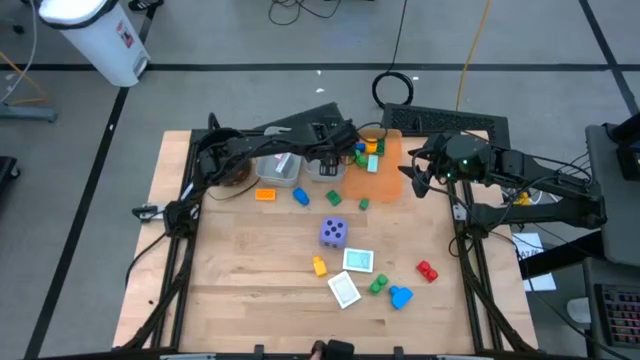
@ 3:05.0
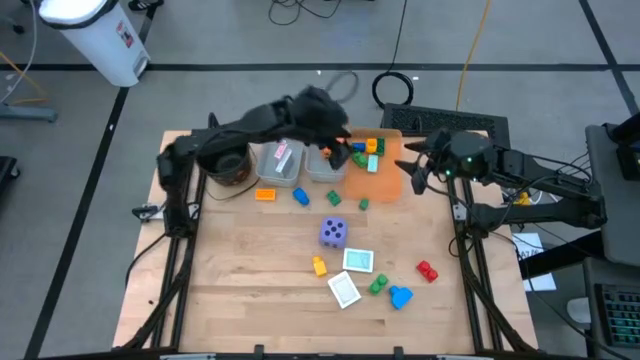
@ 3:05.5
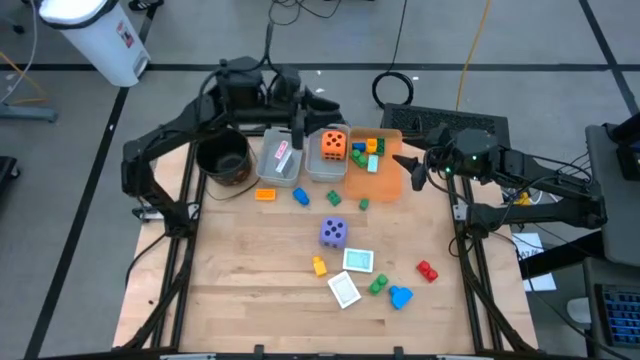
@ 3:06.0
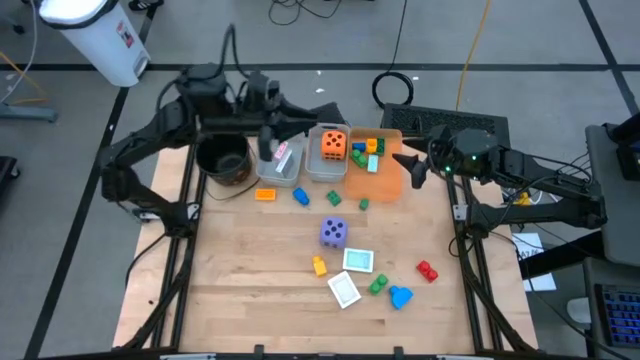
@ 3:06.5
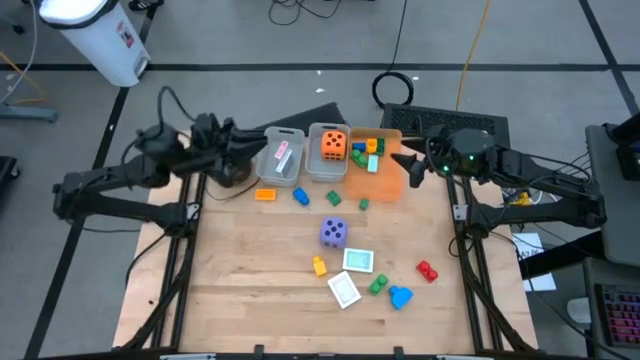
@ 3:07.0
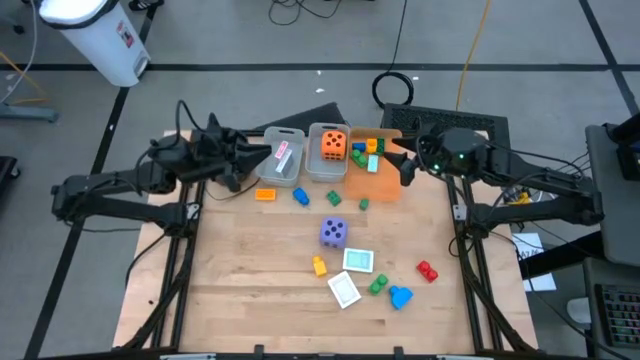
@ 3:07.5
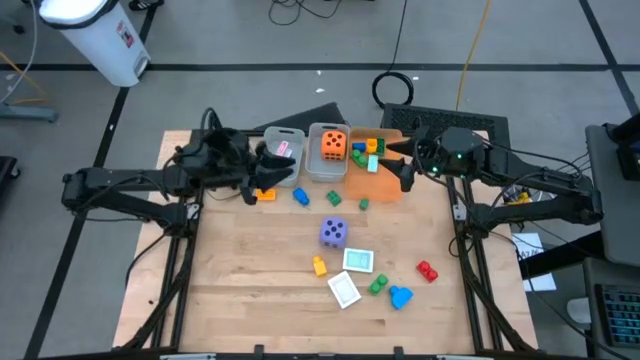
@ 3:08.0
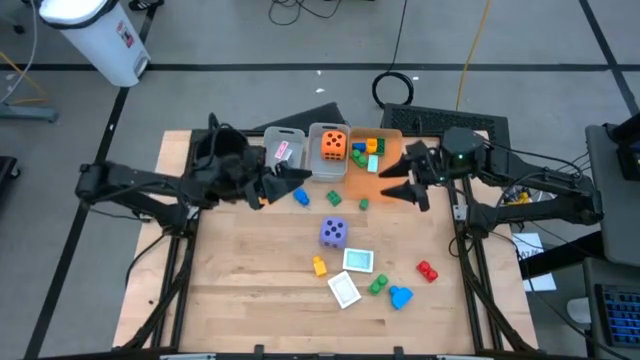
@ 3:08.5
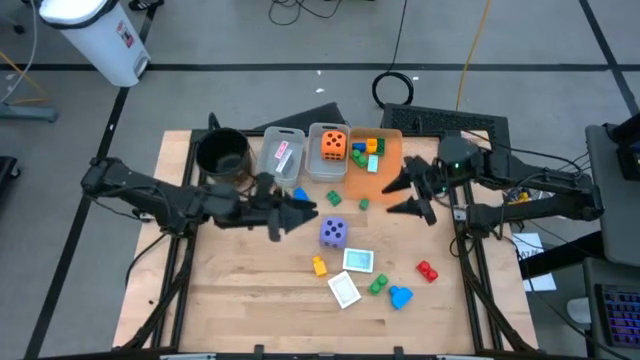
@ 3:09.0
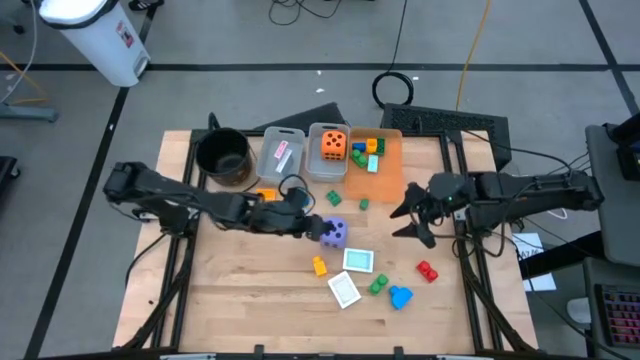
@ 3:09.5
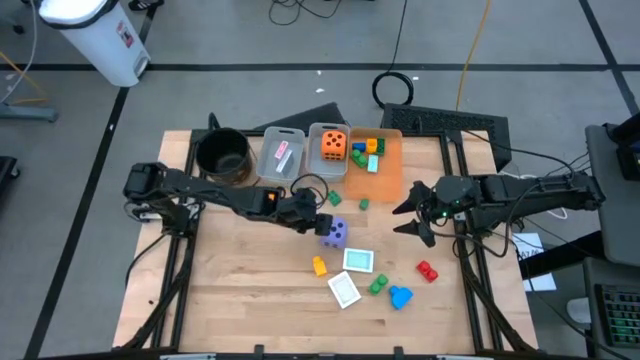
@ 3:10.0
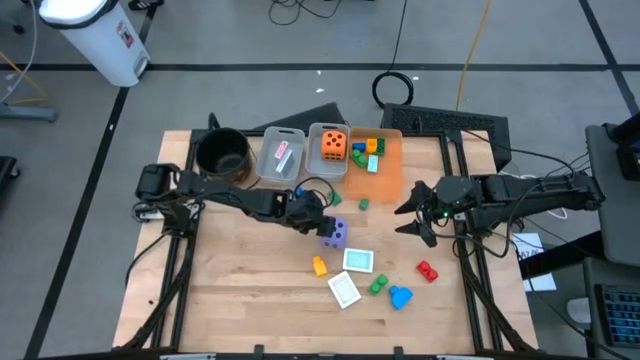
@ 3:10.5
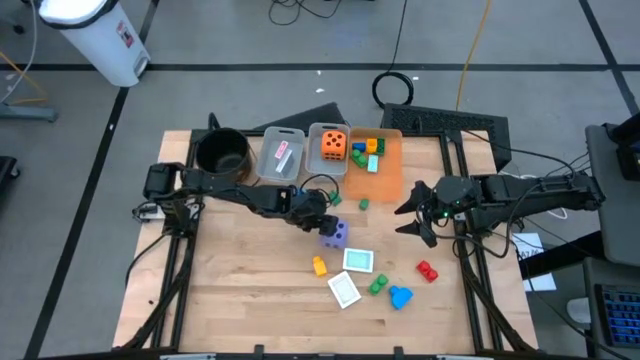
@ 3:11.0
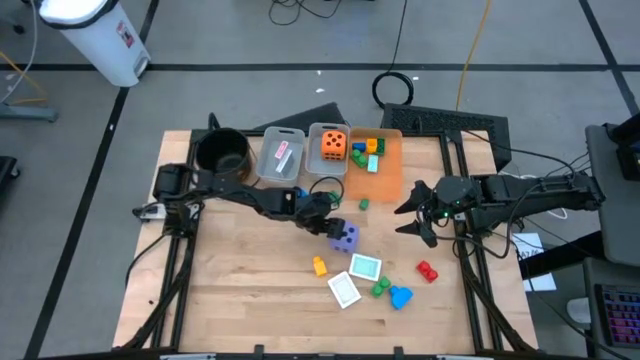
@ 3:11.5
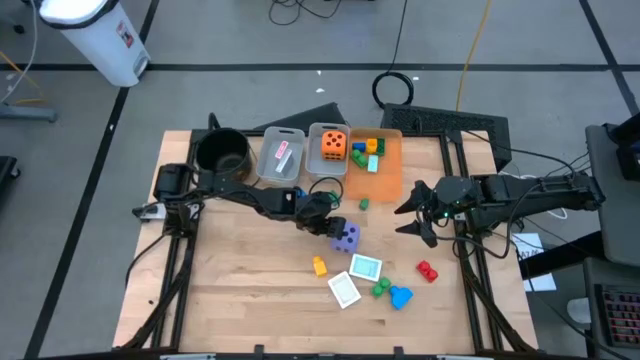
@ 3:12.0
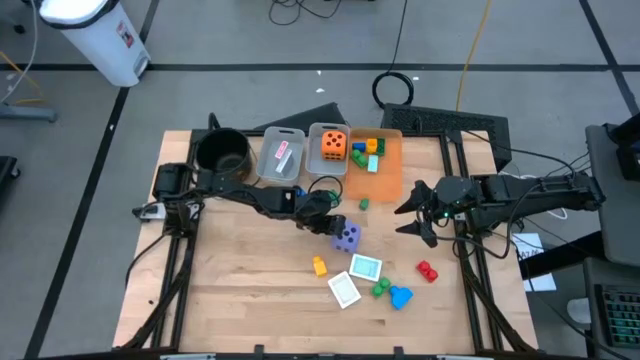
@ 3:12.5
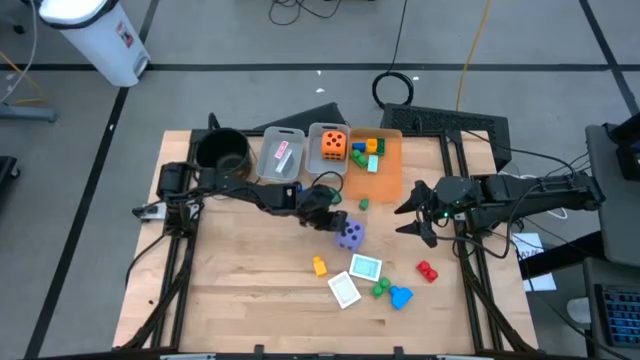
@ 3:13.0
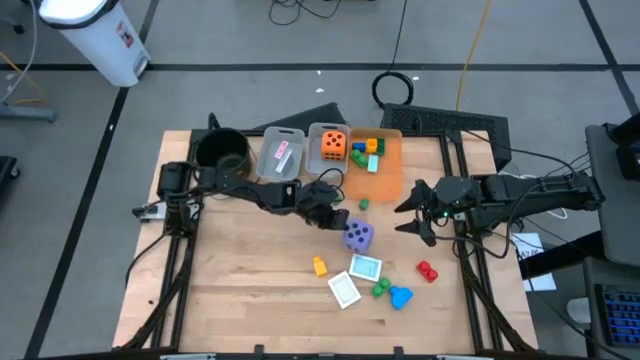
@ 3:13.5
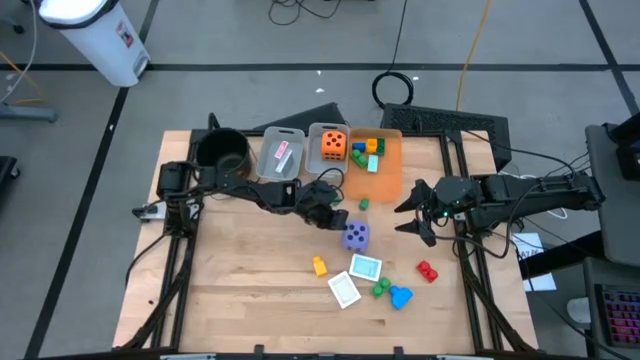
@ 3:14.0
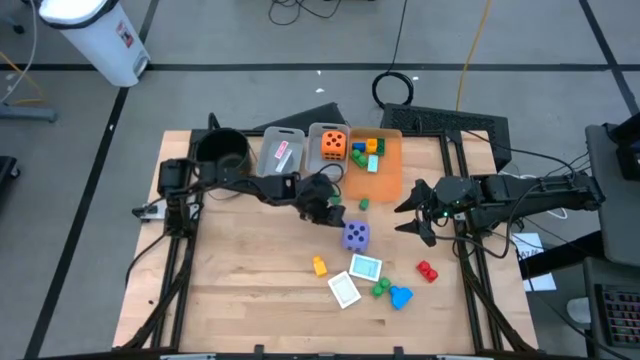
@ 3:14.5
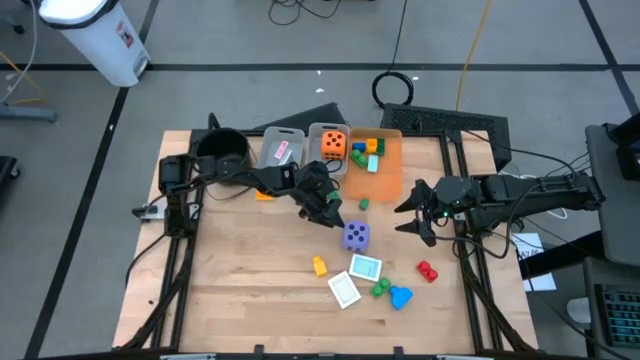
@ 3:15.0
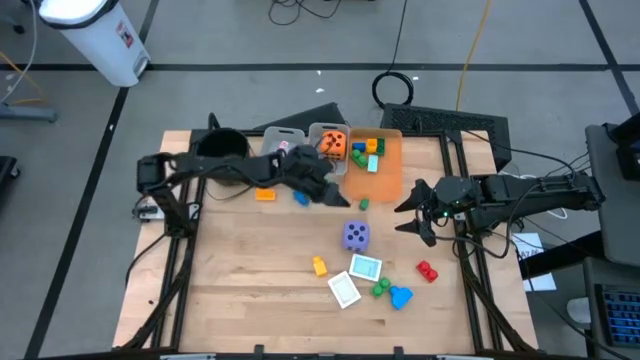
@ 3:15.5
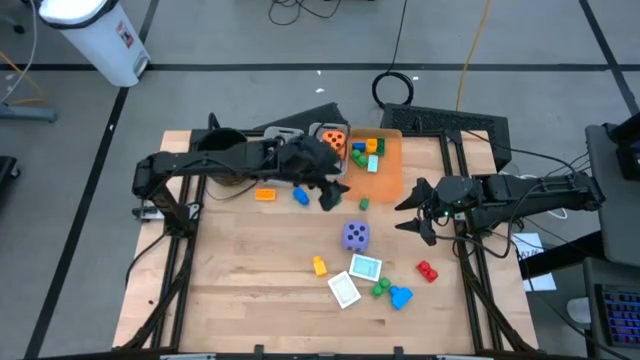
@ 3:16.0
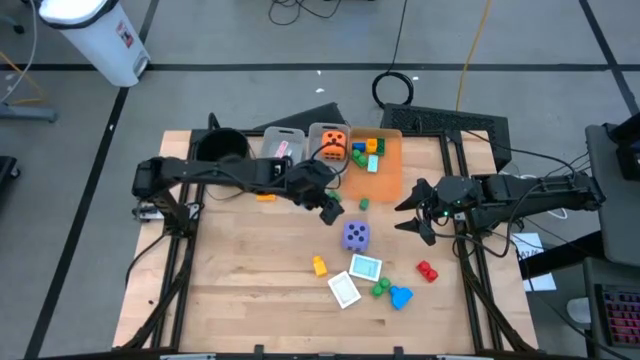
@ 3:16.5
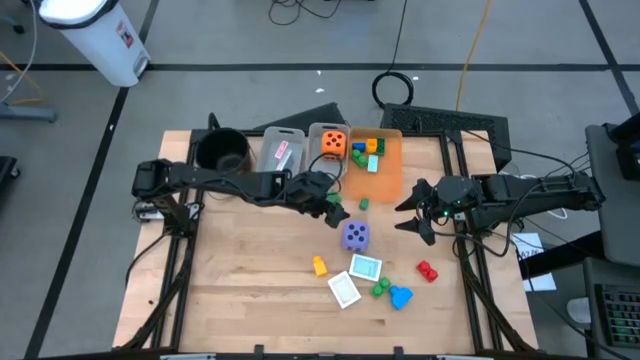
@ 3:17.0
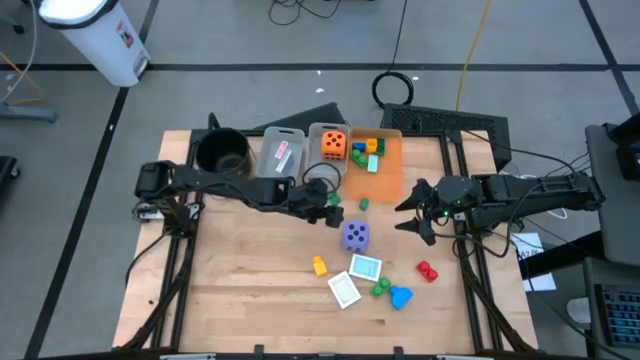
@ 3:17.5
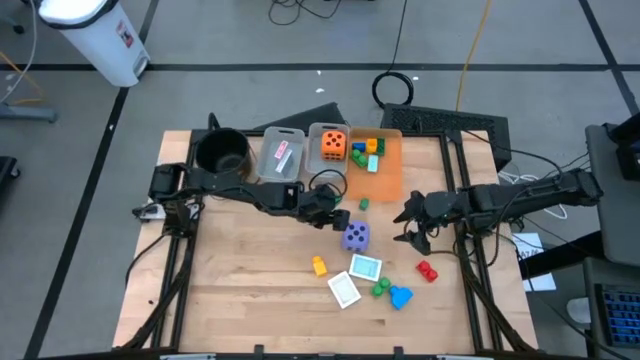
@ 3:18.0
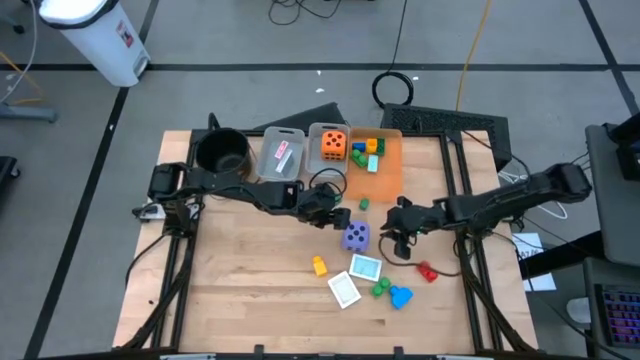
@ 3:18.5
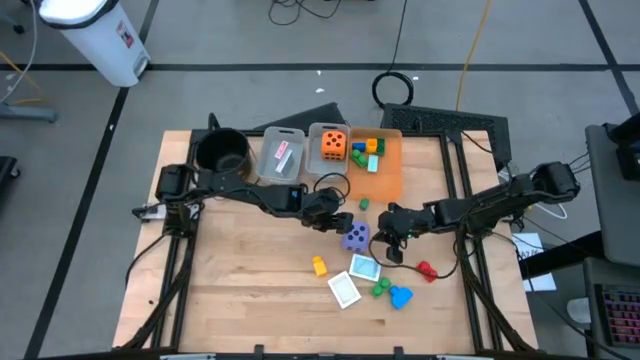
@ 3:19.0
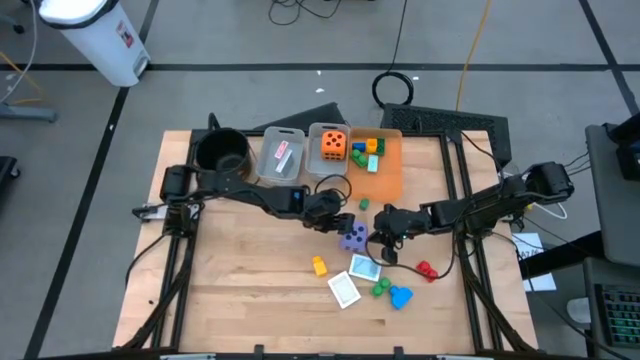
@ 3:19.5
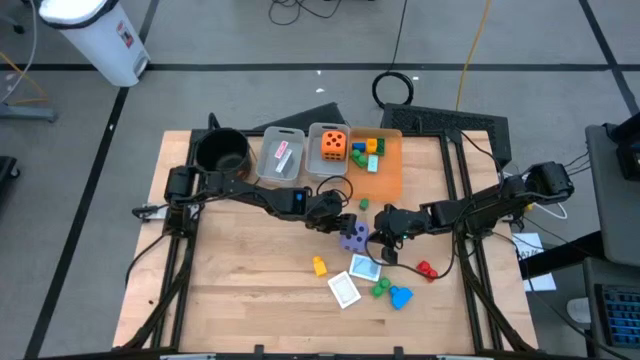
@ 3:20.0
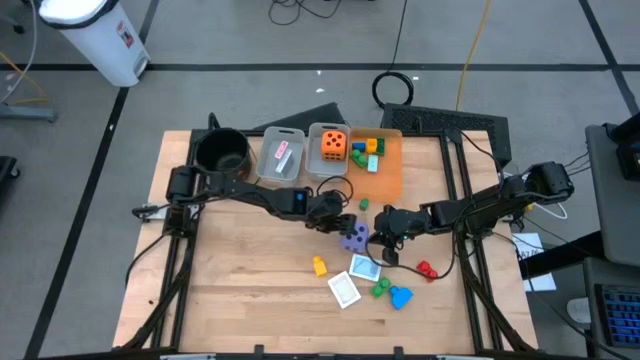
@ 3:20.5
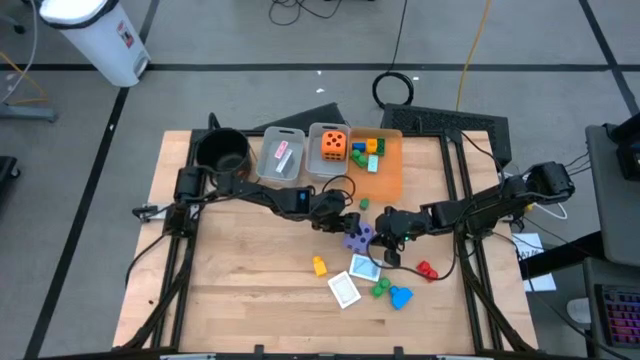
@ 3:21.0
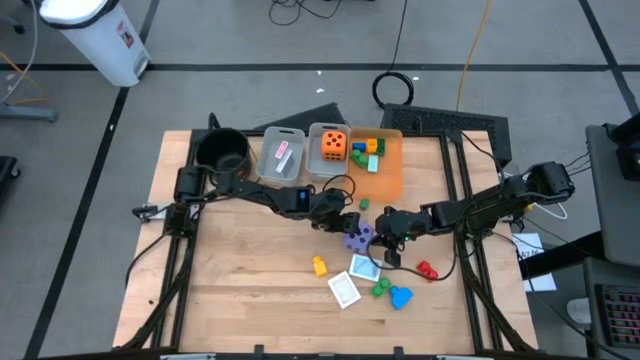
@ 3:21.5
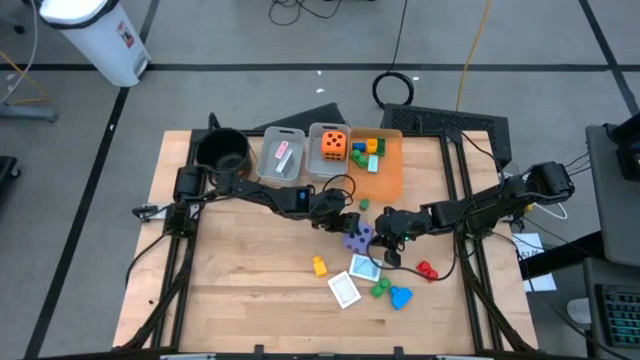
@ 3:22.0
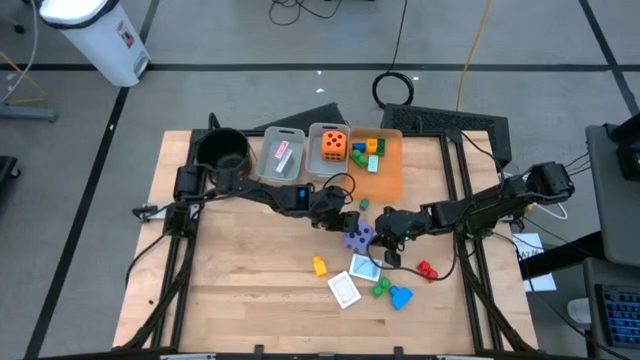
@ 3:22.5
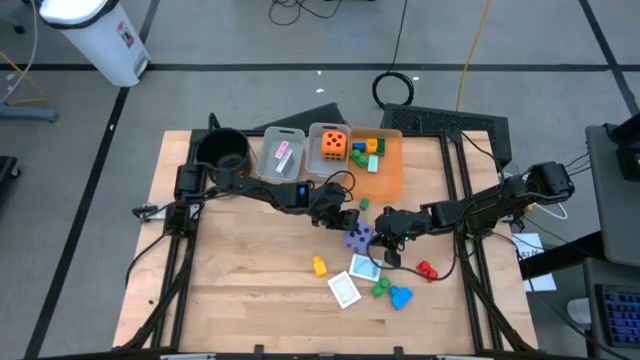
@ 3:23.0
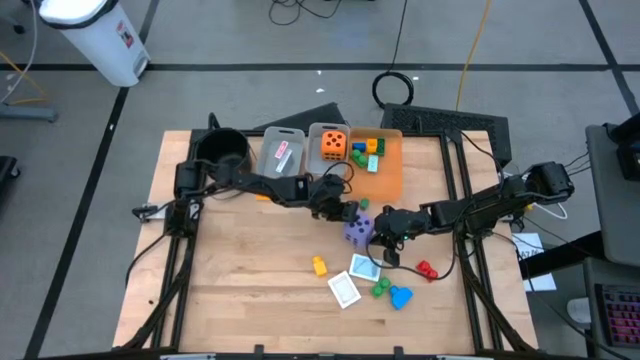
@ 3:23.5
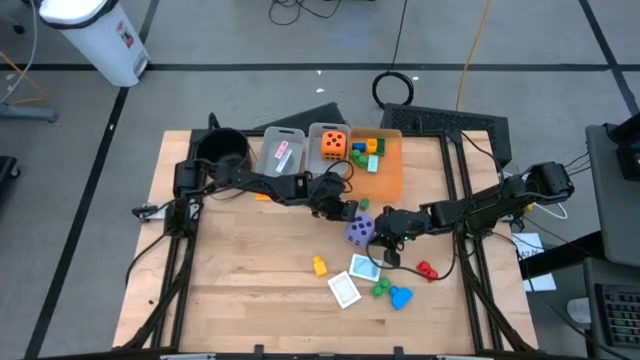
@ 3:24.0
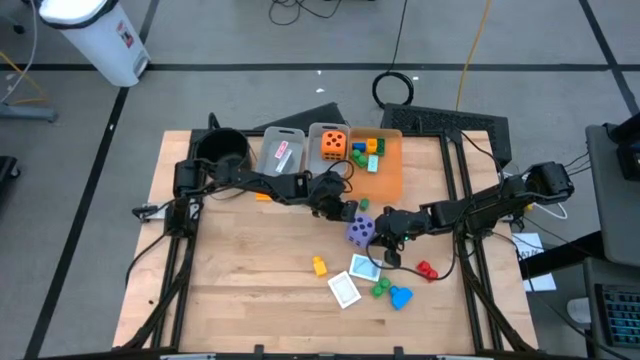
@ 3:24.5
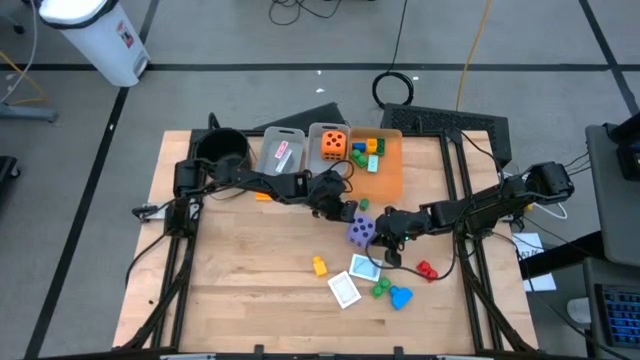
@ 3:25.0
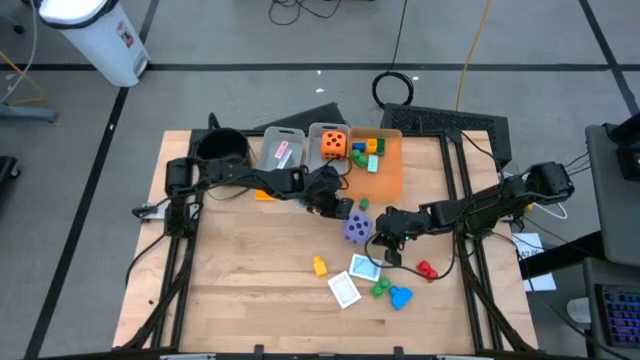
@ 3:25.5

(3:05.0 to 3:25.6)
Task: Pick & Place Toys
Put the purple dice into the right gray bin
